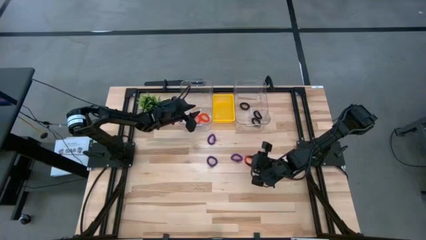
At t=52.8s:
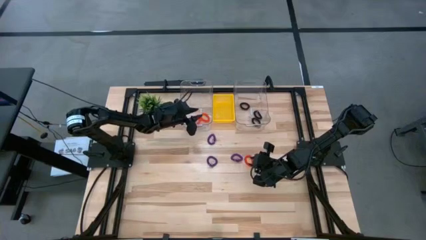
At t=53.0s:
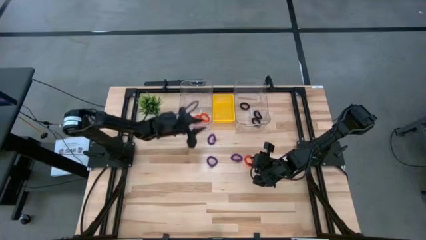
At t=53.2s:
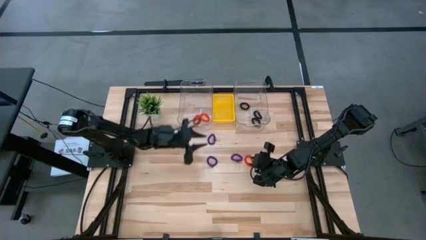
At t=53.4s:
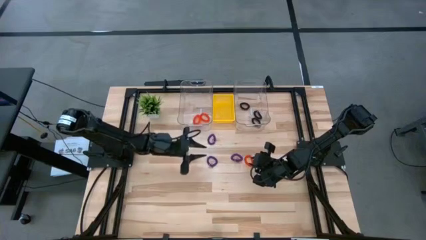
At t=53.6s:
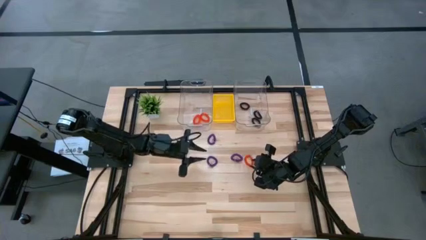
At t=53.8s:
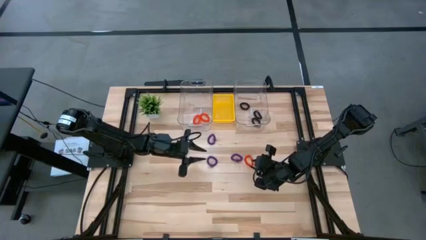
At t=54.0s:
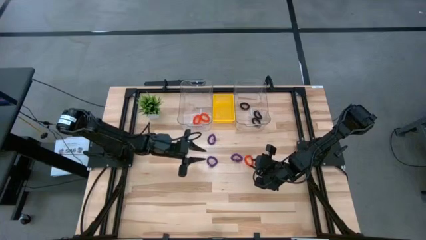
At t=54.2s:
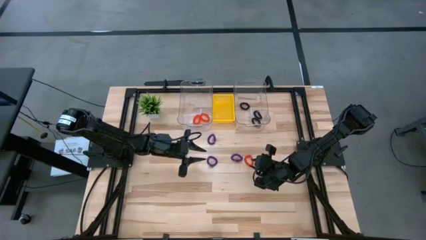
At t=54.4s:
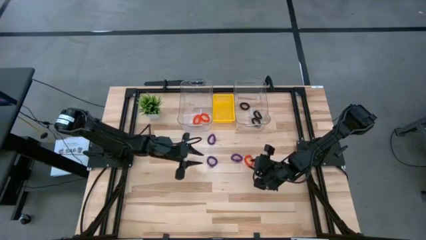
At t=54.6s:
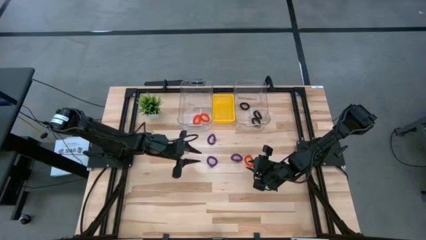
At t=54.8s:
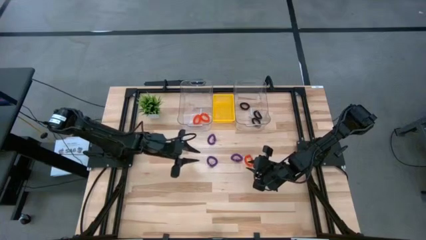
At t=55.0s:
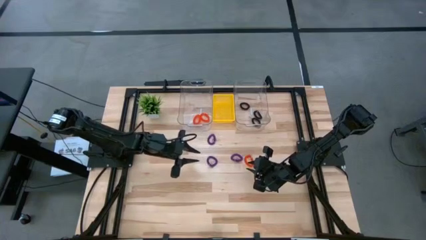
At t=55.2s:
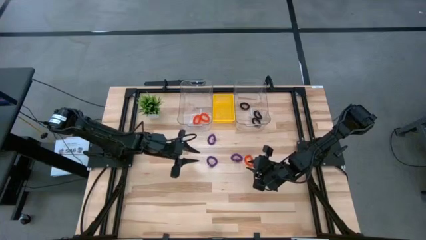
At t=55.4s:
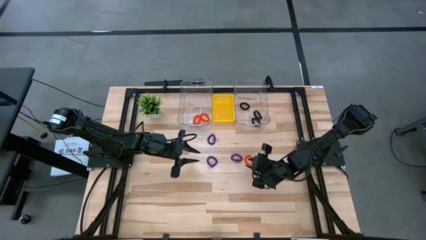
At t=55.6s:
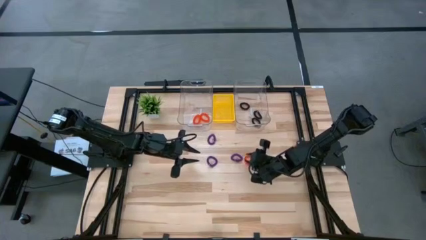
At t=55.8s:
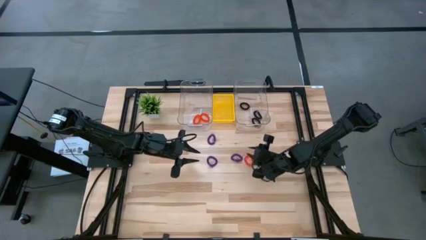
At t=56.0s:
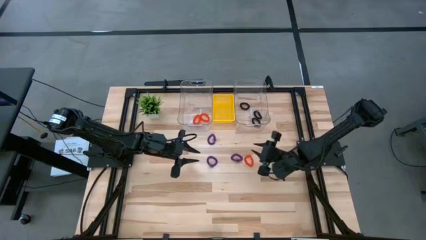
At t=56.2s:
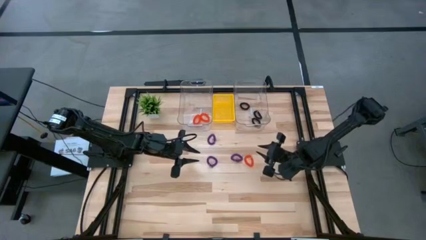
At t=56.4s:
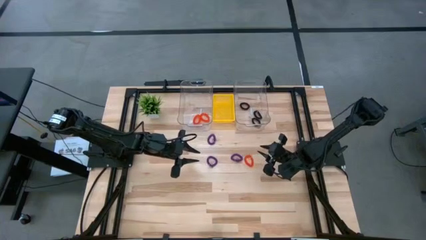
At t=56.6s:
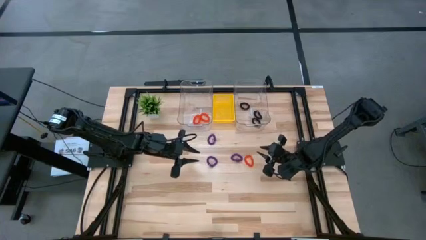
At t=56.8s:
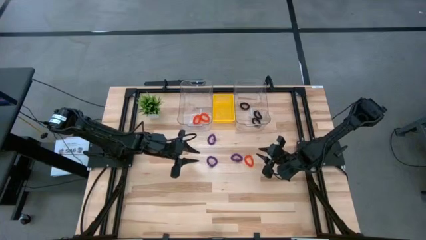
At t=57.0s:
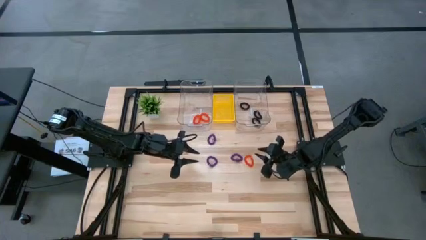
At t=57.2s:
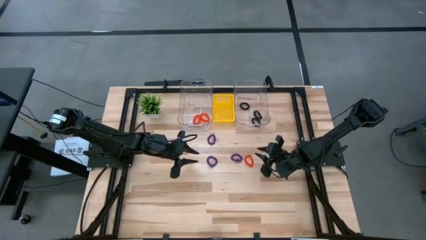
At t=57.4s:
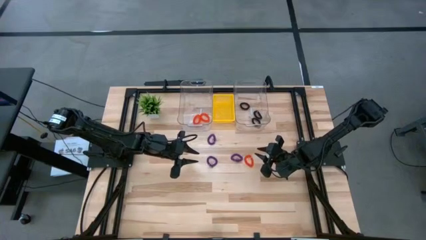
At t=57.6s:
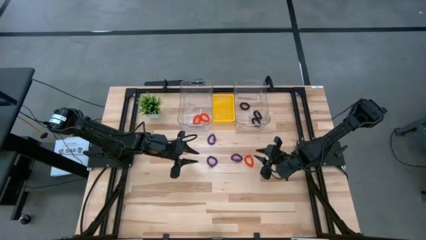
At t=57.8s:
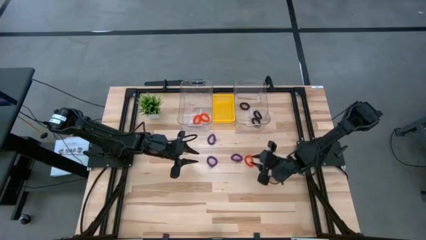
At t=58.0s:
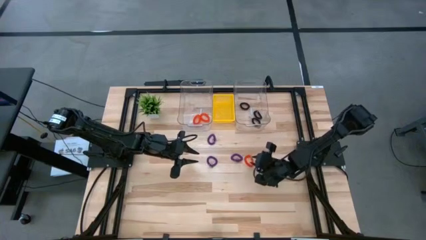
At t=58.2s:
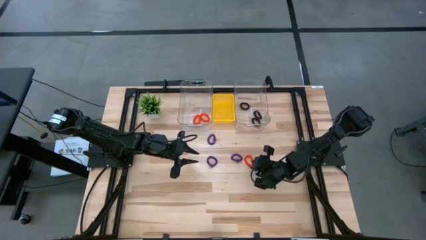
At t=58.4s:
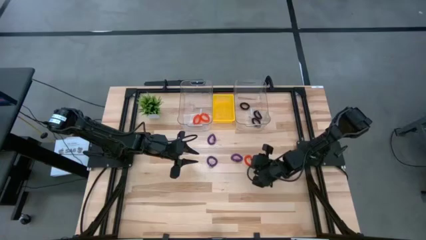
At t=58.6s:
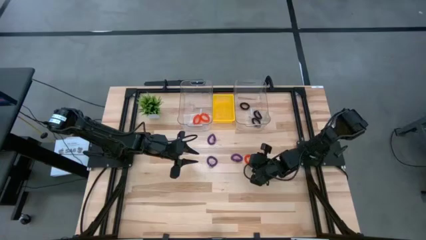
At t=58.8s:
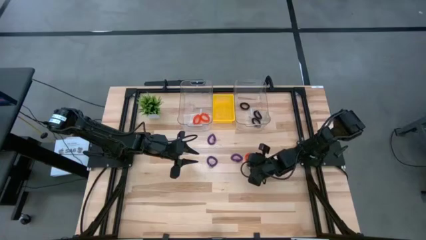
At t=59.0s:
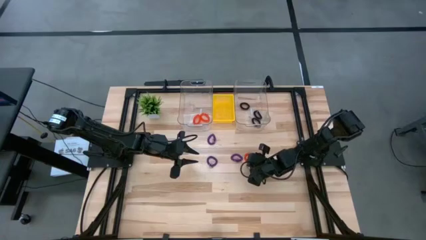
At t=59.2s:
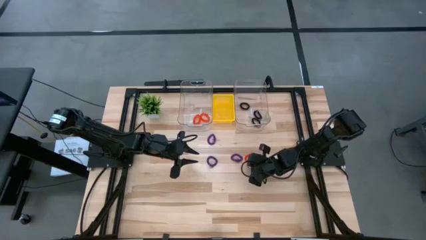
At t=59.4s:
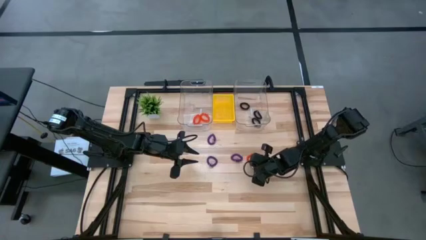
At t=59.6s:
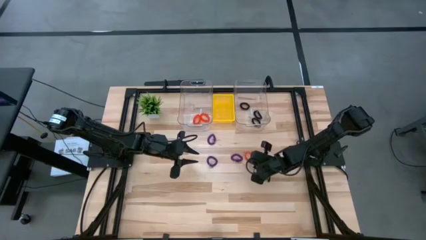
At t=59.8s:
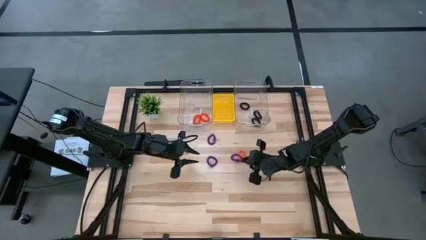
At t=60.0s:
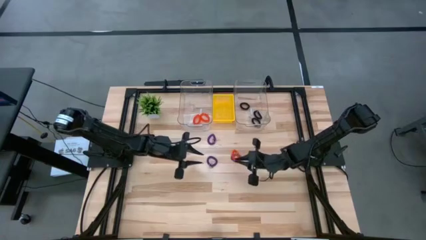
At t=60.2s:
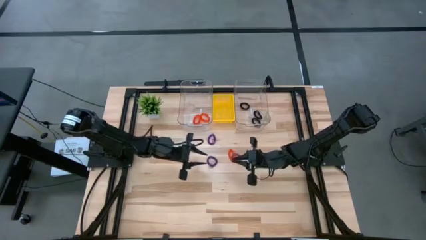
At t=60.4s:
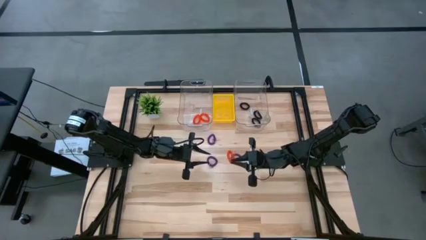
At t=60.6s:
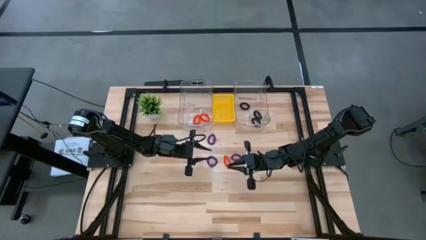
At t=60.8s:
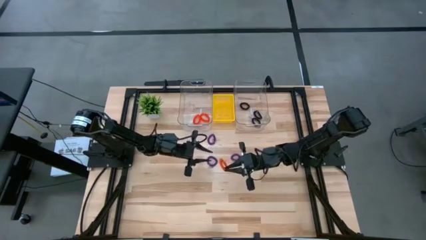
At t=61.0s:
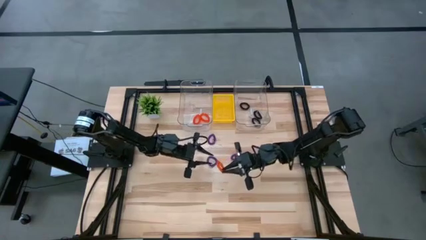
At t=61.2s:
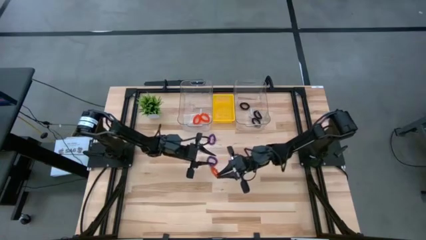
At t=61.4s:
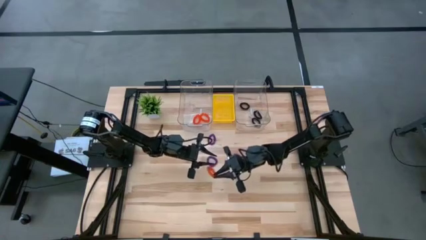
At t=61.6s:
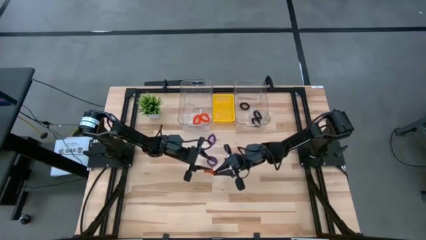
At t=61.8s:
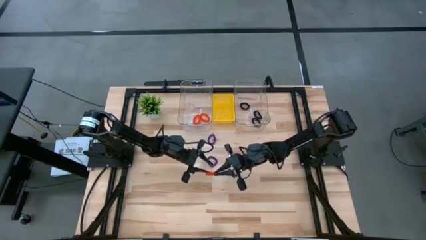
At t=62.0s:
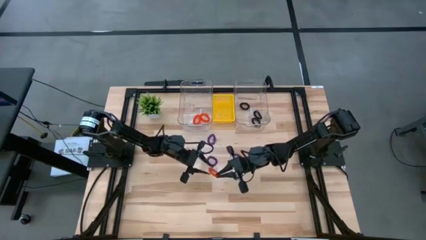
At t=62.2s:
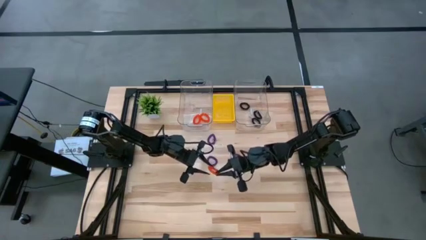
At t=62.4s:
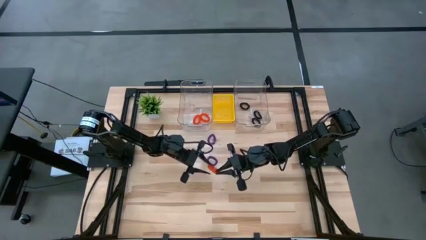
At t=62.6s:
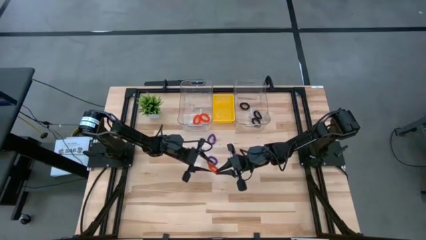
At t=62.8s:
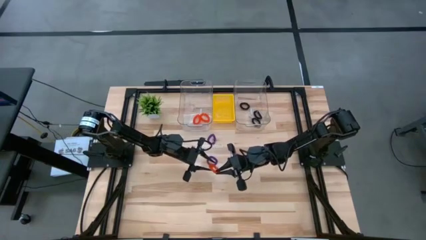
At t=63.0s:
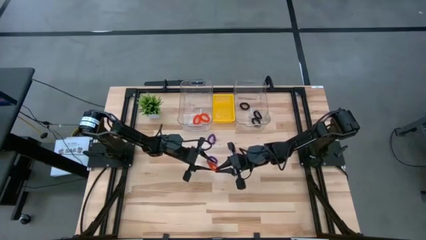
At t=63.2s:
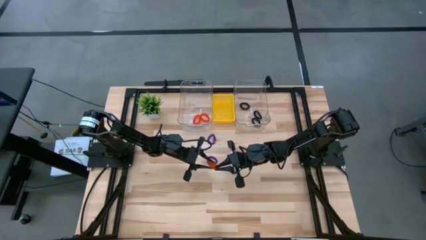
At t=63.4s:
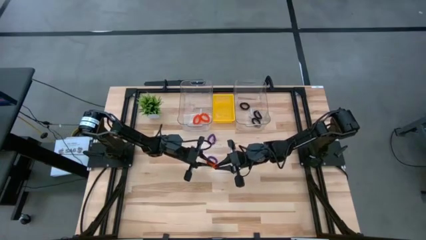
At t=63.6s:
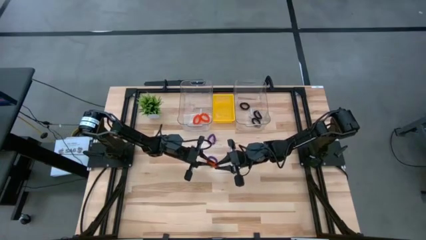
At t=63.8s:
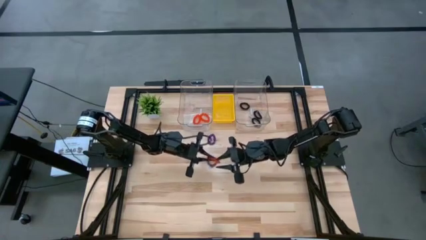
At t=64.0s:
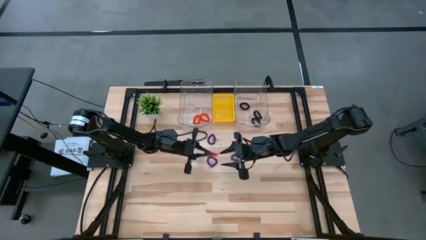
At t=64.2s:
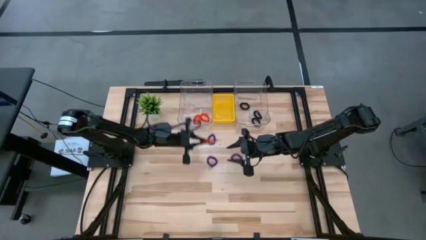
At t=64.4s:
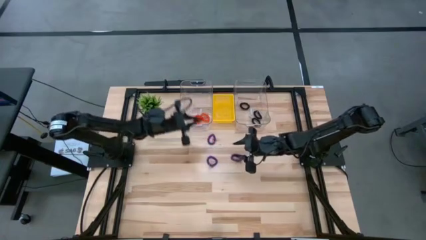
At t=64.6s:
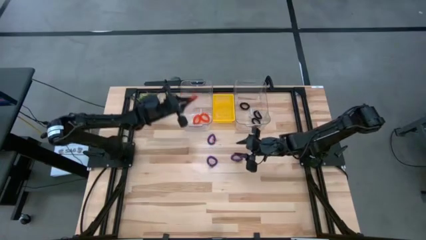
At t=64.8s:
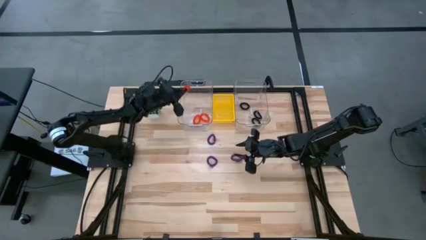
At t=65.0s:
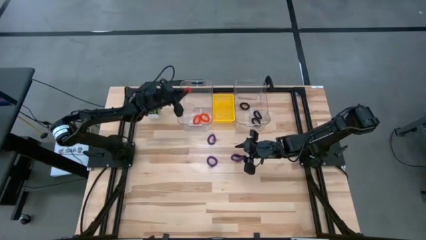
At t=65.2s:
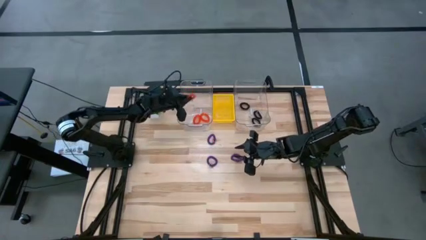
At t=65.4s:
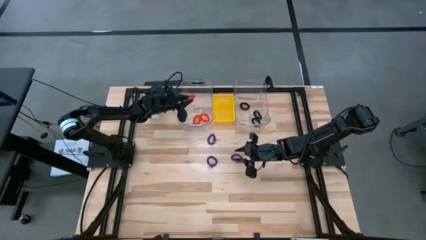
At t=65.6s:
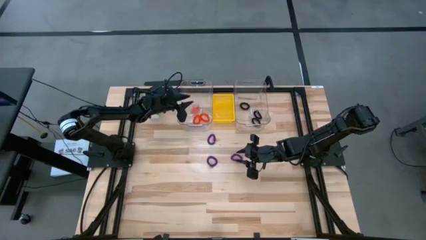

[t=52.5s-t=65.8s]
Task: Sort spring keychains
Put the orange spring keychain into the left transparent bin

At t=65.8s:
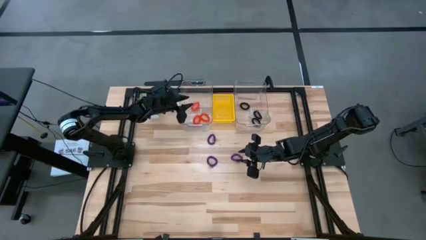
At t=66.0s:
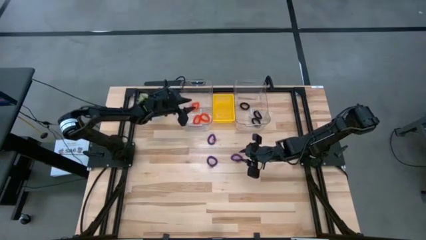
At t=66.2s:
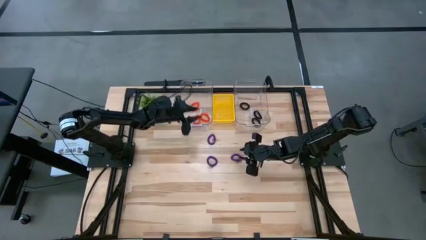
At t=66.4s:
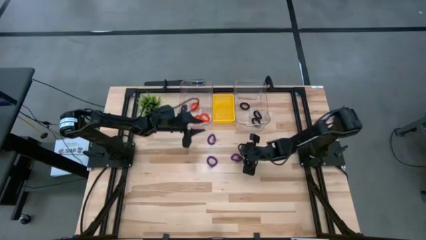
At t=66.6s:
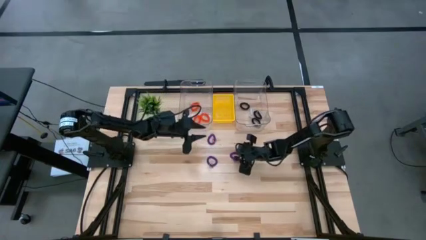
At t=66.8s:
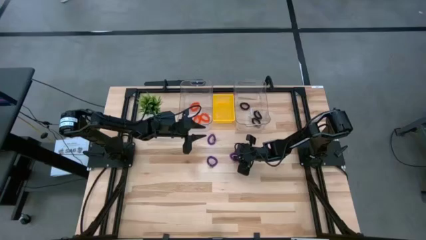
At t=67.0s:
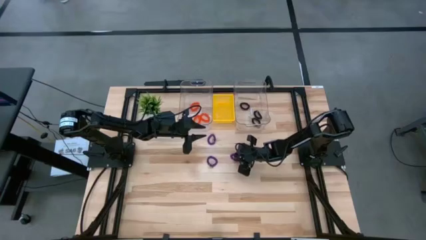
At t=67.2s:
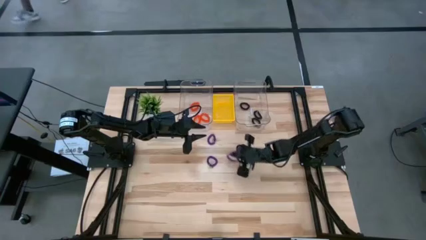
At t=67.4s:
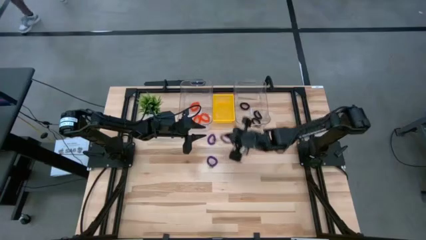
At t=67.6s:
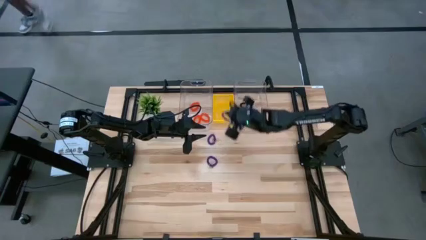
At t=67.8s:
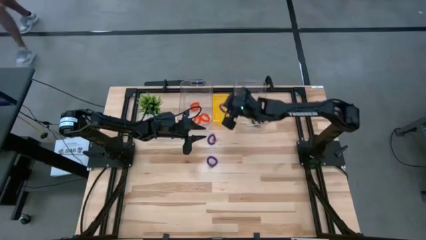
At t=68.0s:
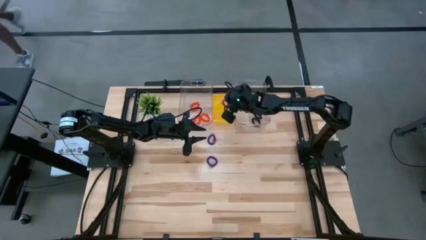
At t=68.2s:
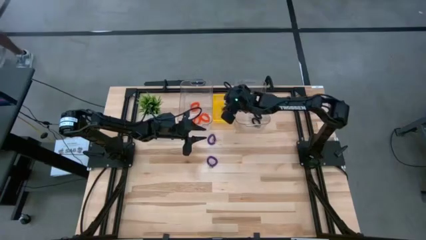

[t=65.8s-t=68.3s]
Put the bottom right purple spring keychain into the yellow bin
